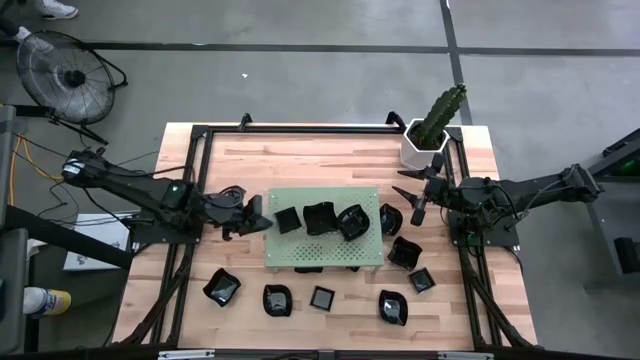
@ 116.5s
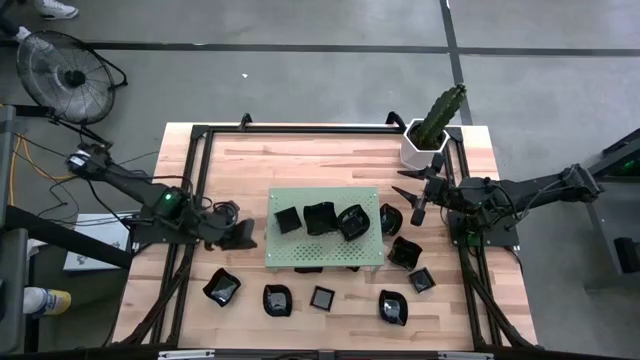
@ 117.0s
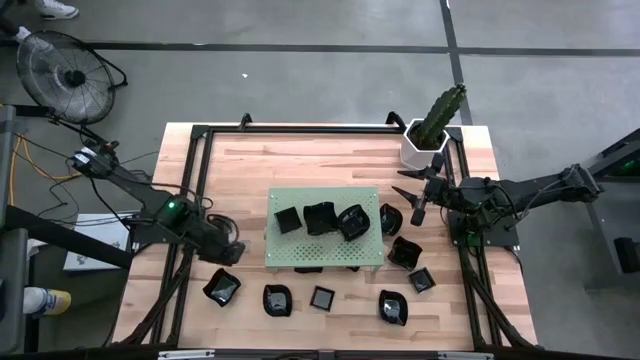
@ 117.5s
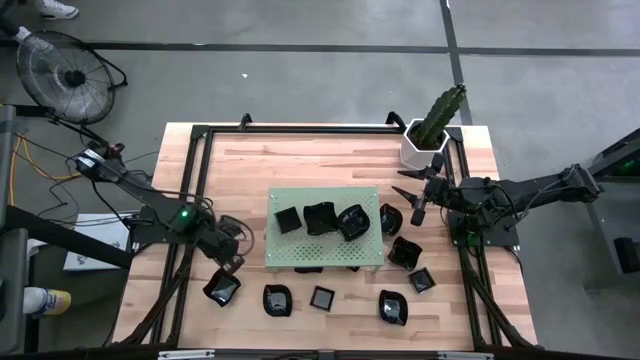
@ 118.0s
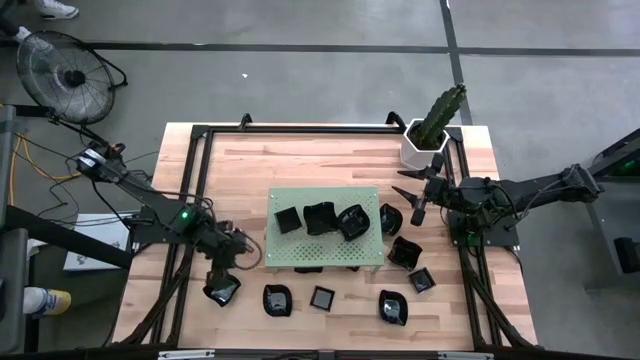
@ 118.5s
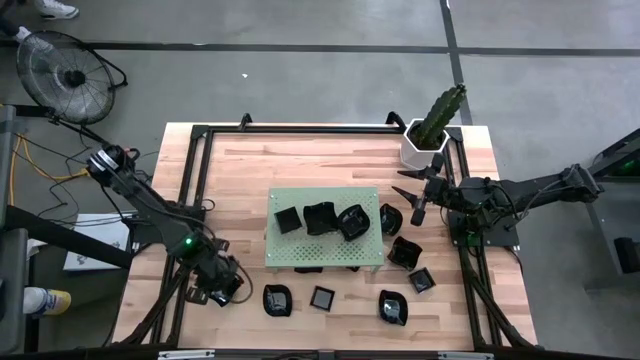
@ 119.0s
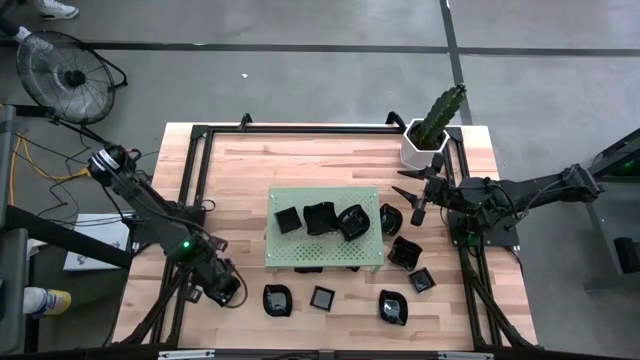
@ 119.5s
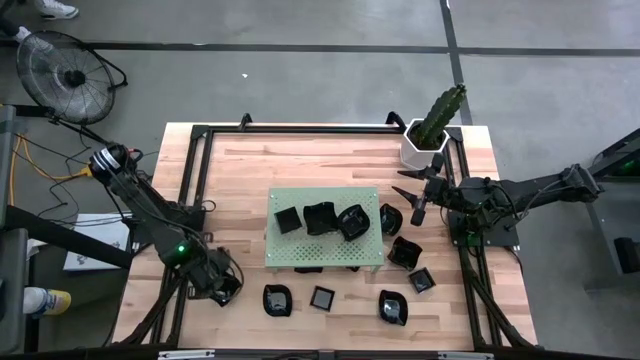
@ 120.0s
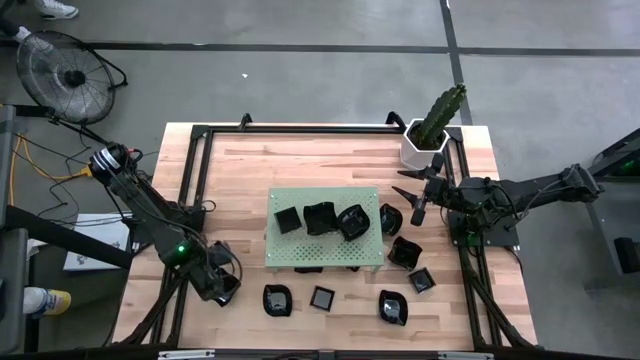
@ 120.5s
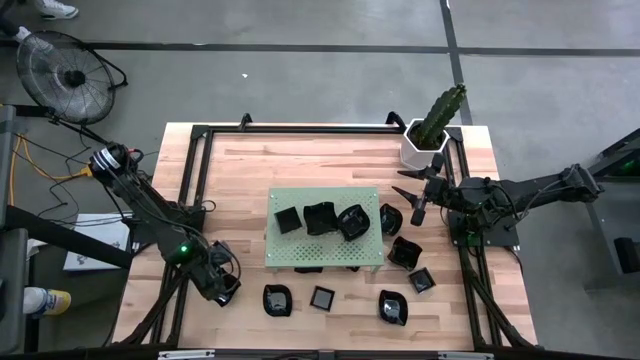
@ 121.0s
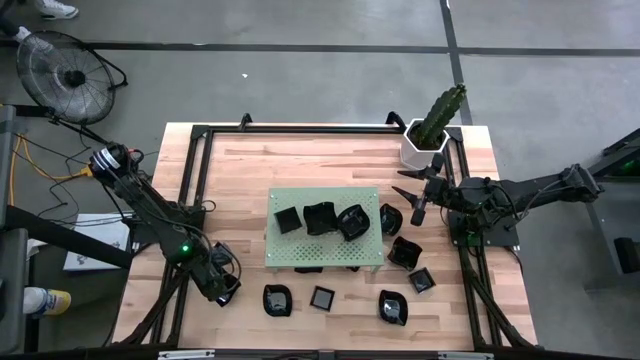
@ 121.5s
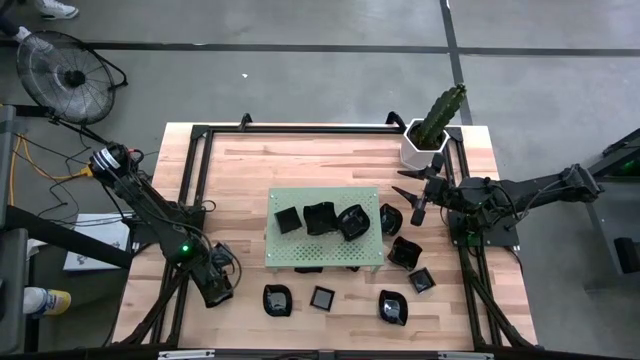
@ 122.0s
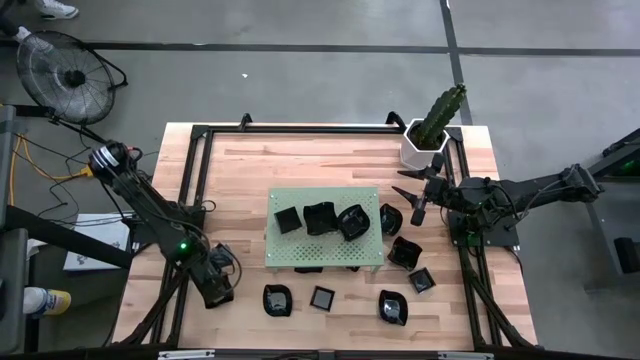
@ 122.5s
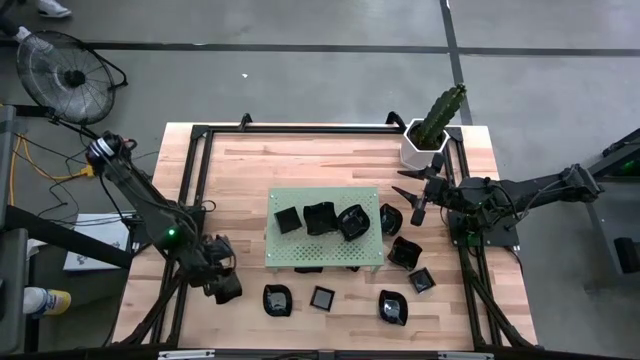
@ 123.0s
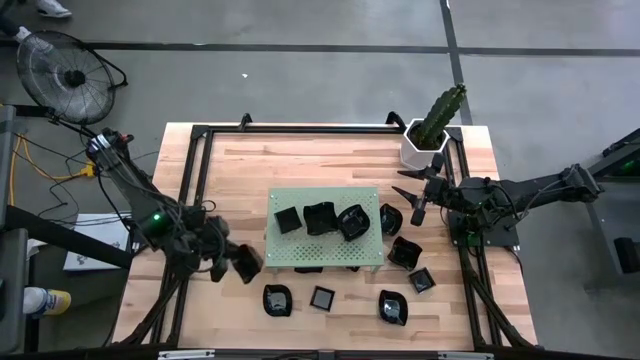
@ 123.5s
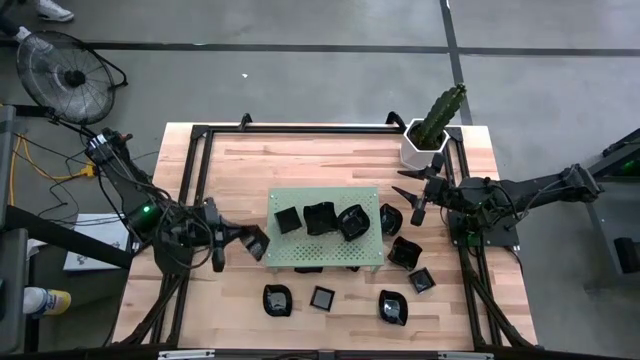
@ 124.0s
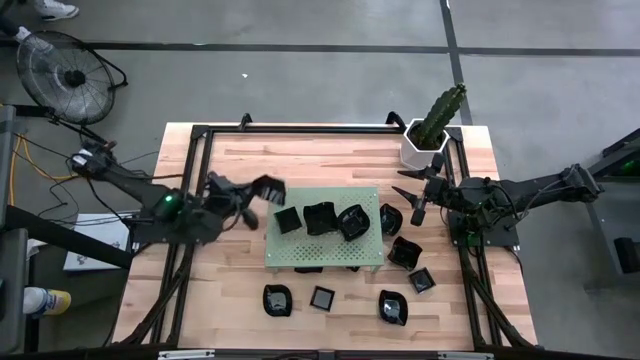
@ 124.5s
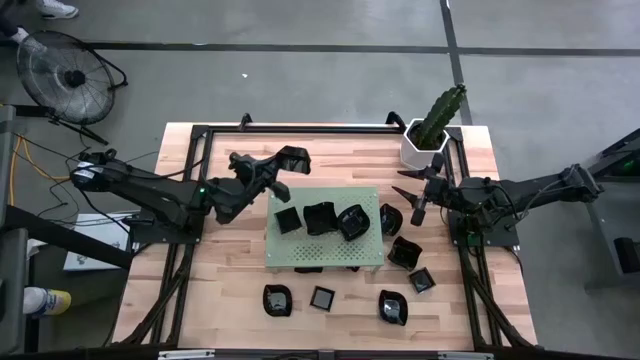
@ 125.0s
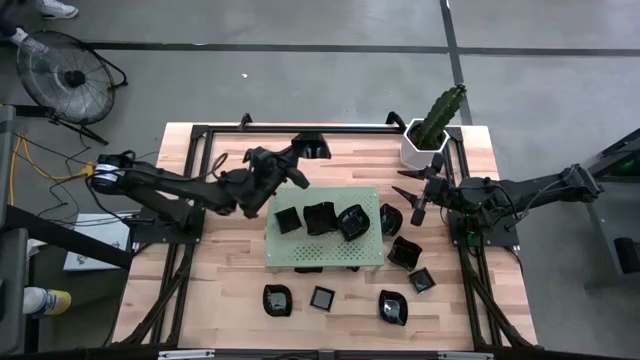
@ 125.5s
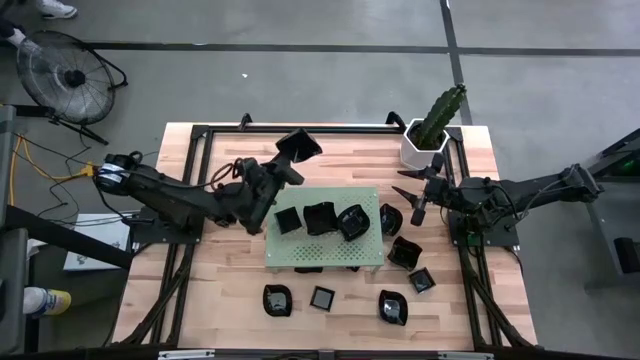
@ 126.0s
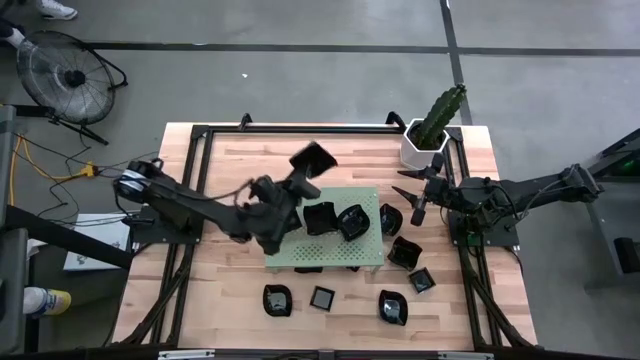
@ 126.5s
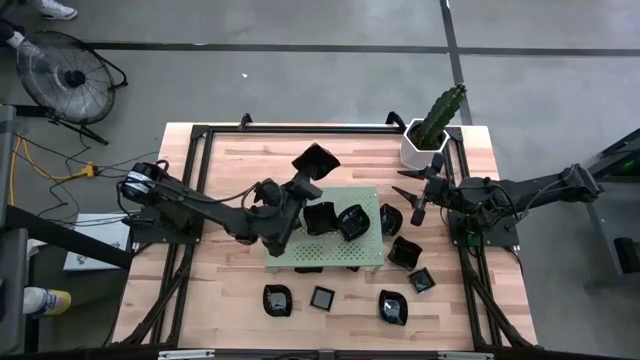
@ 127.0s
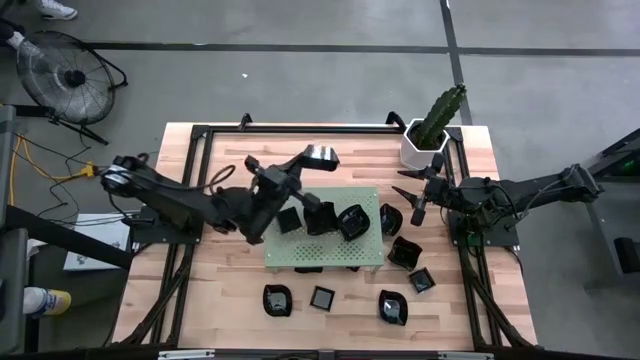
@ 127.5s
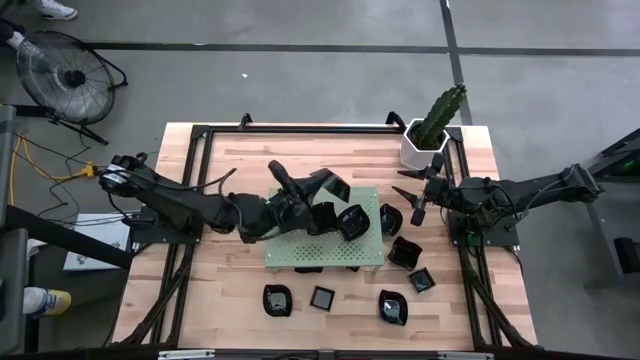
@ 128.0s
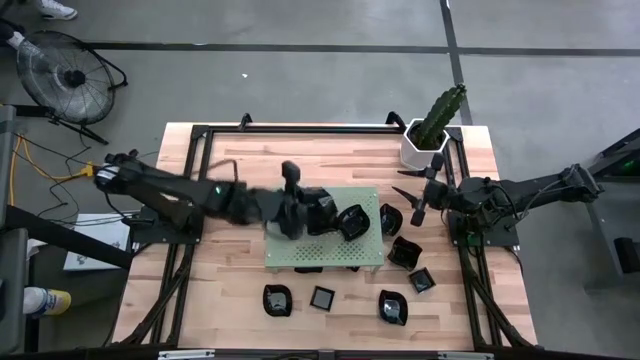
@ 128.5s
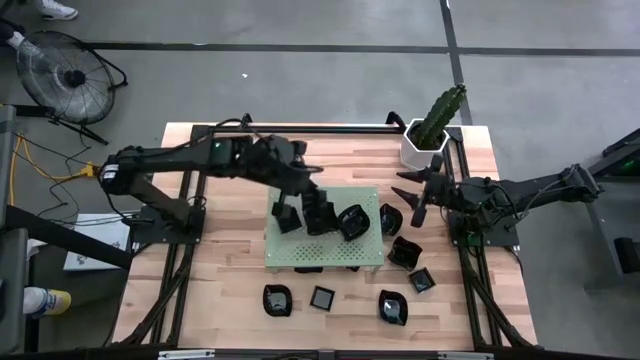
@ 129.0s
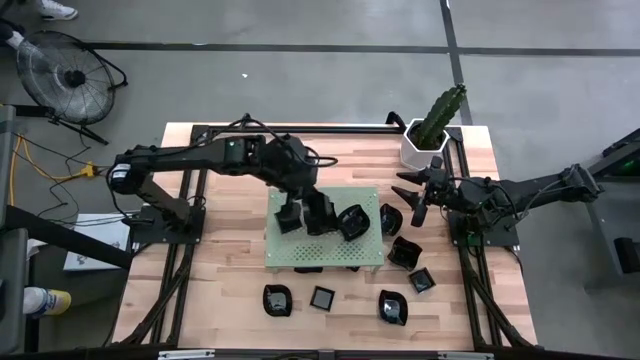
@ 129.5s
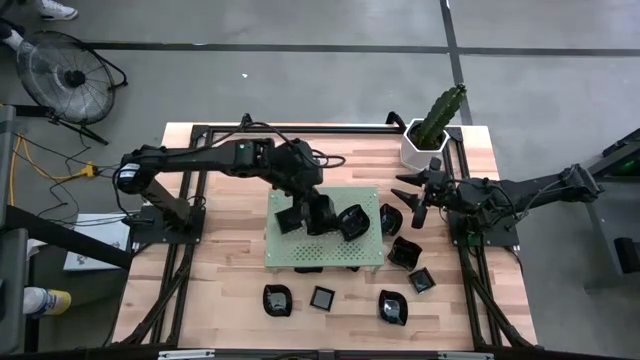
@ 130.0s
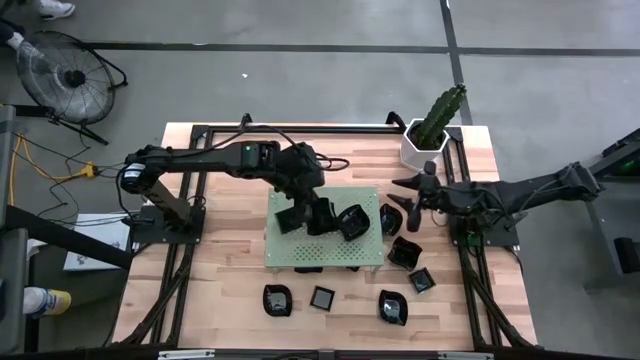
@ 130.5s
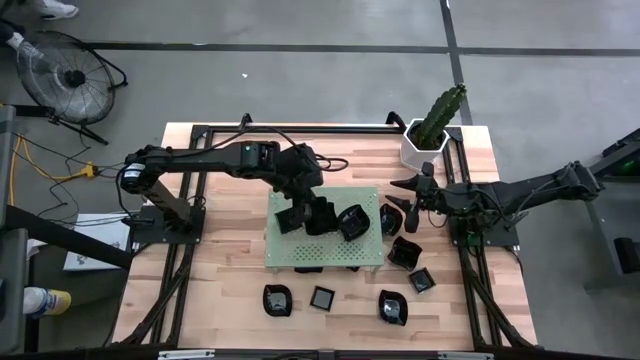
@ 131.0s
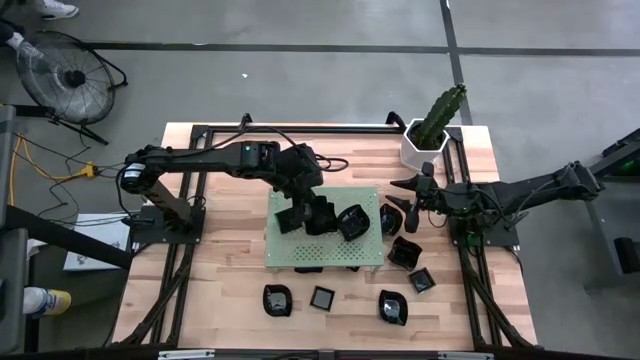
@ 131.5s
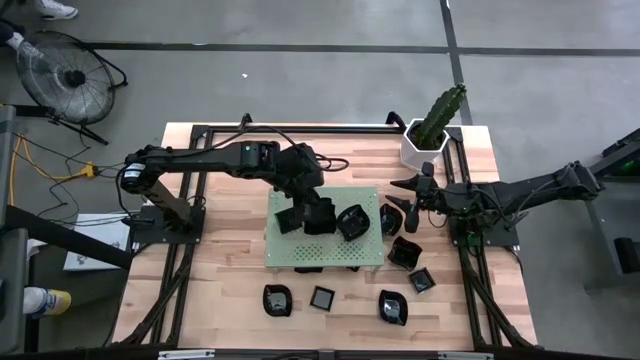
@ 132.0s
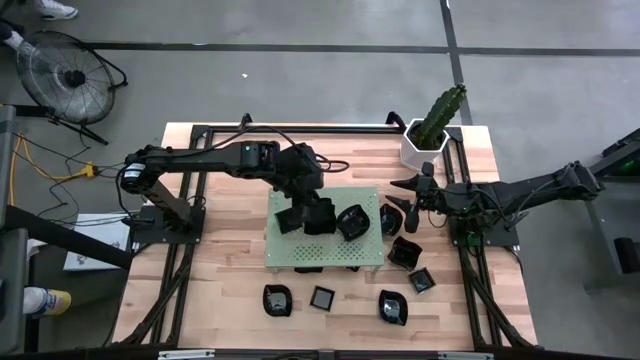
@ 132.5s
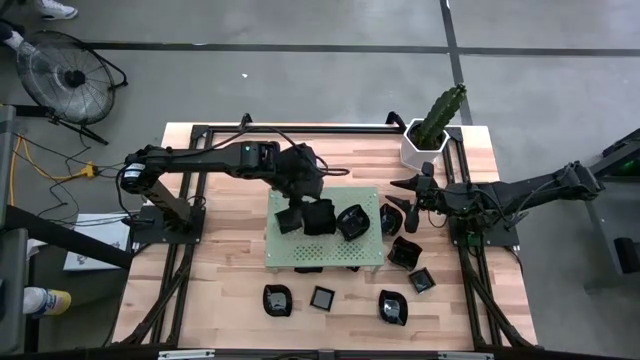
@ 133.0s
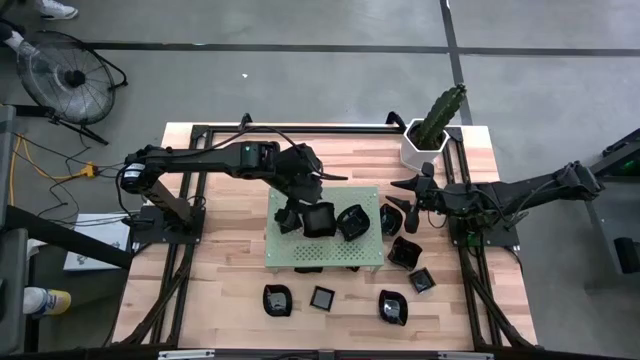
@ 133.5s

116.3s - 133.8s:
Task: Pick & Place Mini shaped plates
Stack the black wave square shaped bowl on top of the black wave square shaped bowl on the shelf

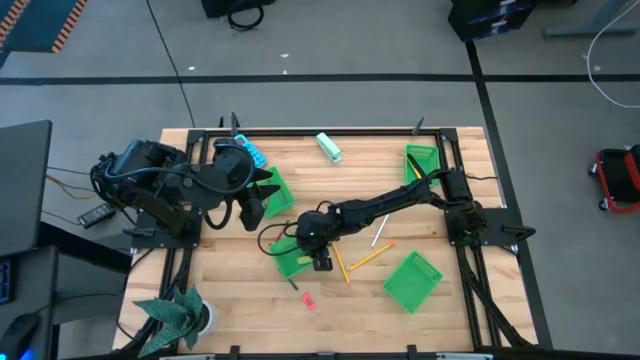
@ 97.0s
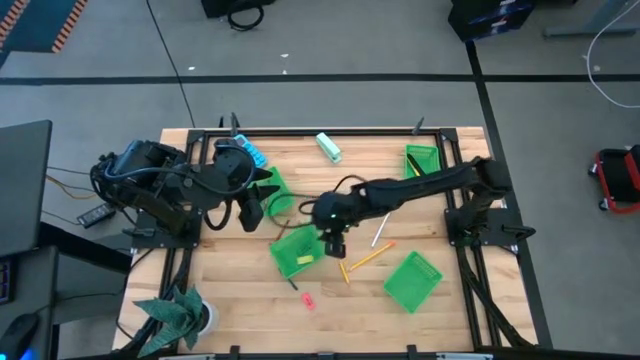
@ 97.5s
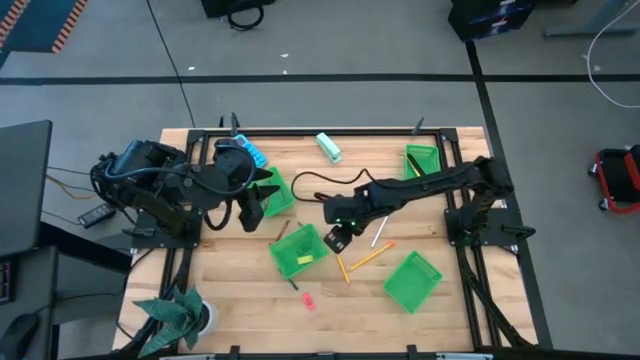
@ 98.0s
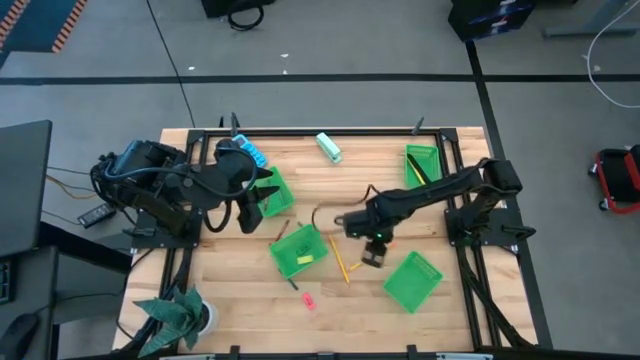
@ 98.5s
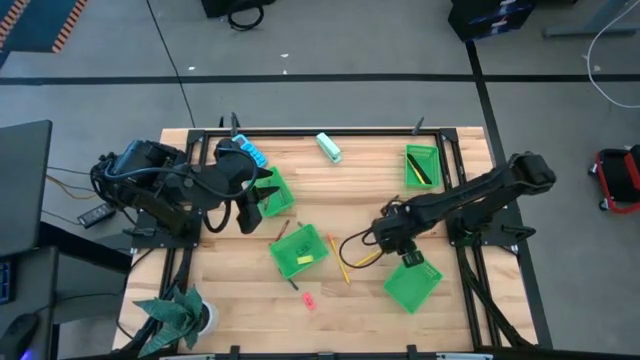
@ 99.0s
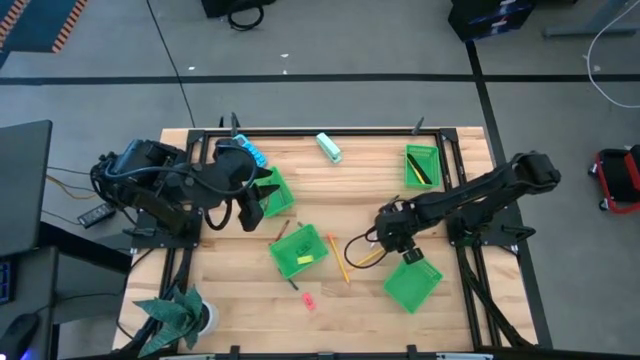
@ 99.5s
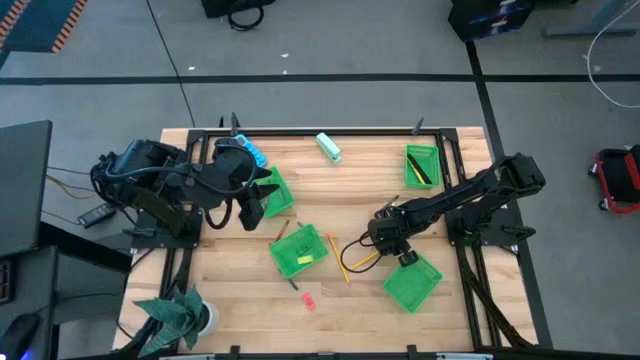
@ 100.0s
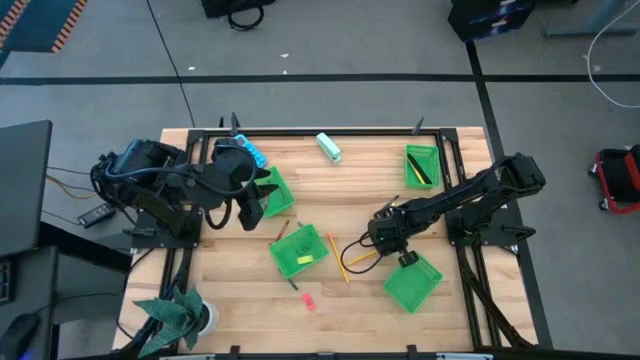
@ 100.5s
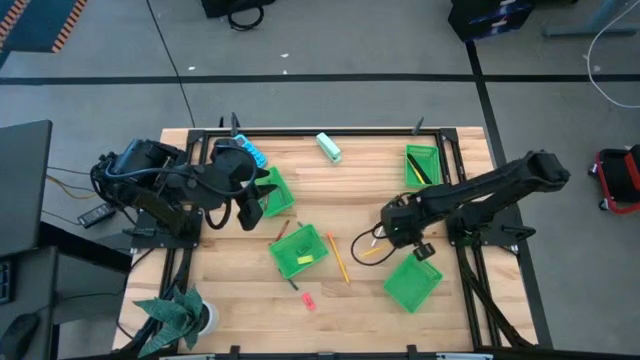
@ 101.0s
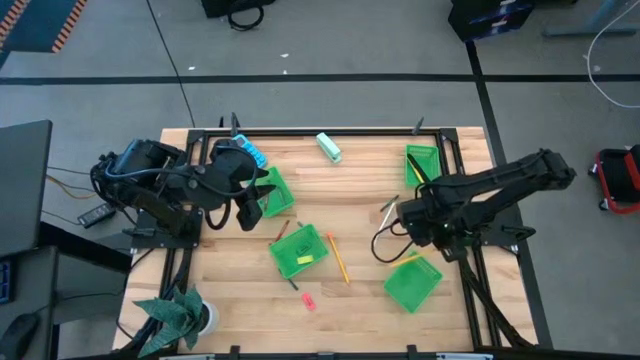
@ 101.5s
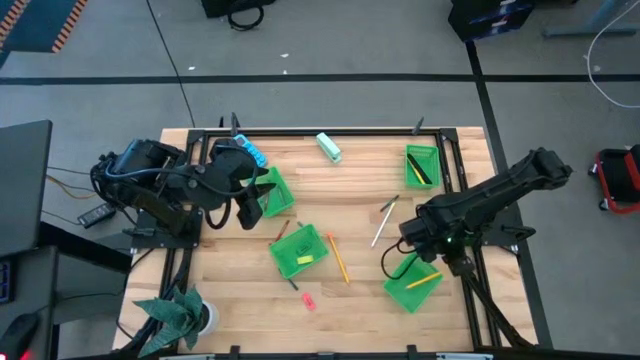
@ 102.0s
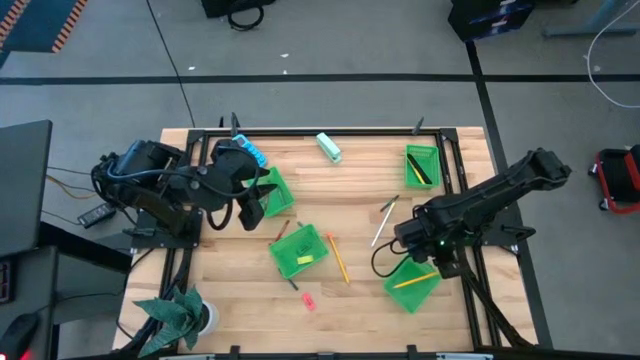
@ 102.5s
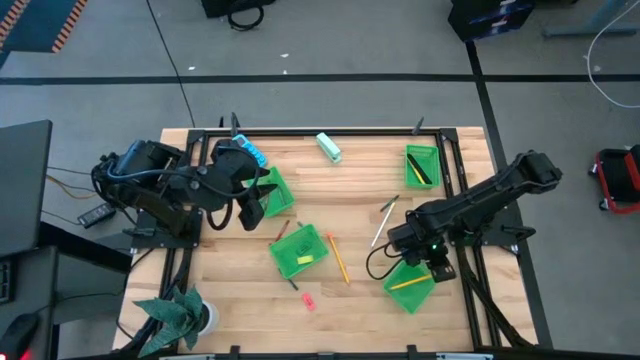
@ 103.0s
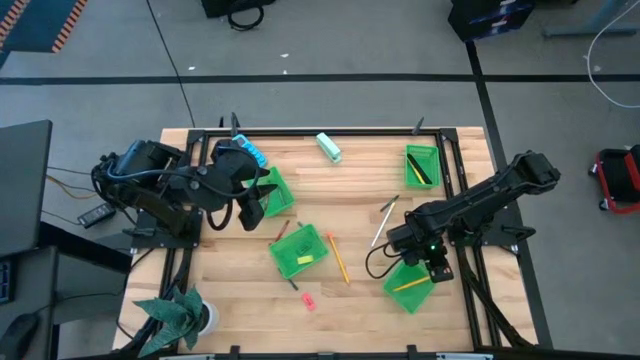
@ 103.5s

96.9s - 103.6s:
Task: Sort crayons/erasers/pens/pencils in bins
Put the right yellow pencil into the bottom right green bin
